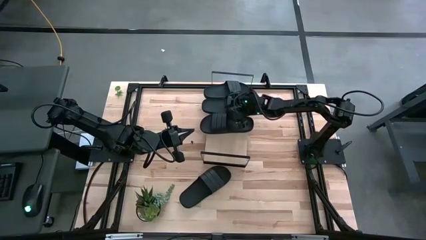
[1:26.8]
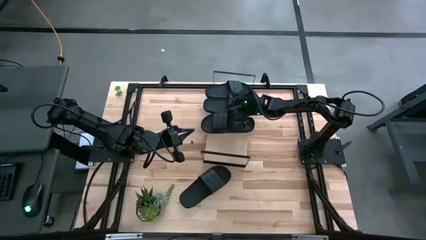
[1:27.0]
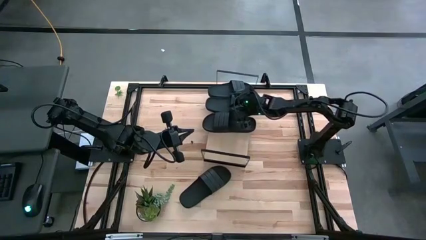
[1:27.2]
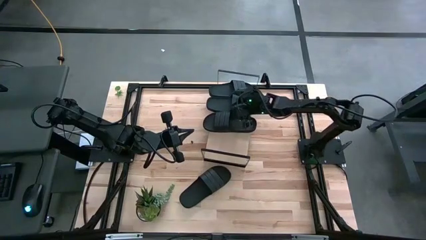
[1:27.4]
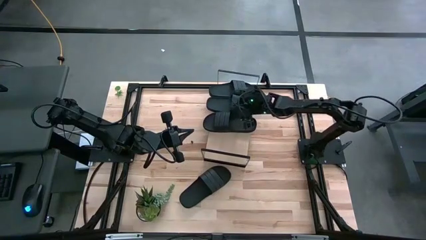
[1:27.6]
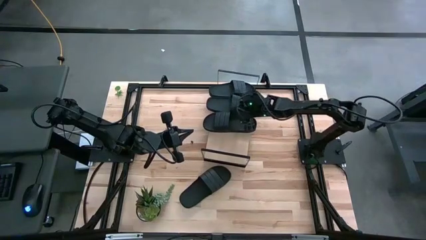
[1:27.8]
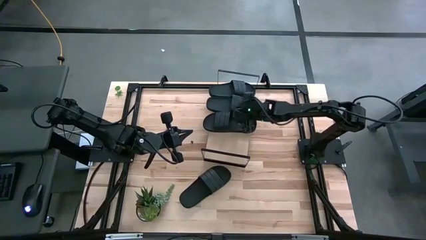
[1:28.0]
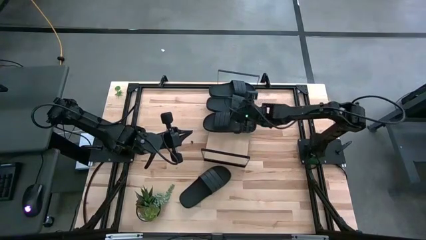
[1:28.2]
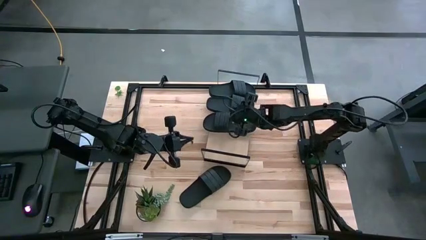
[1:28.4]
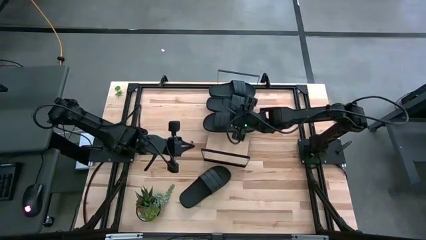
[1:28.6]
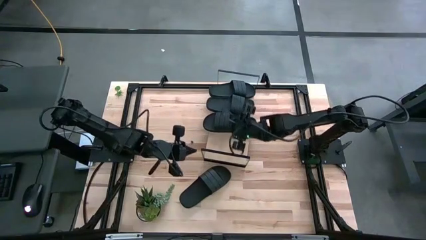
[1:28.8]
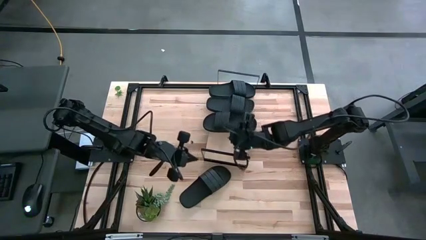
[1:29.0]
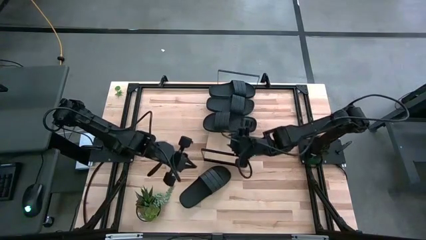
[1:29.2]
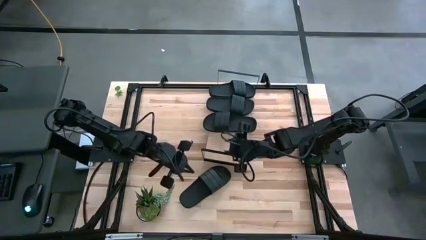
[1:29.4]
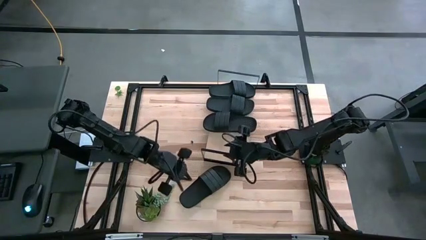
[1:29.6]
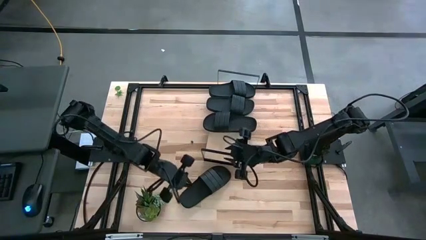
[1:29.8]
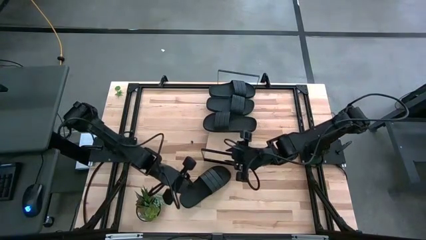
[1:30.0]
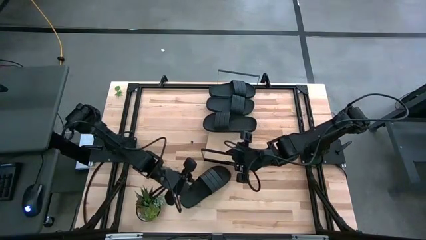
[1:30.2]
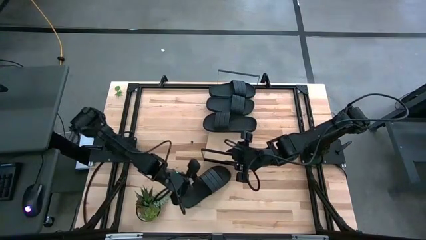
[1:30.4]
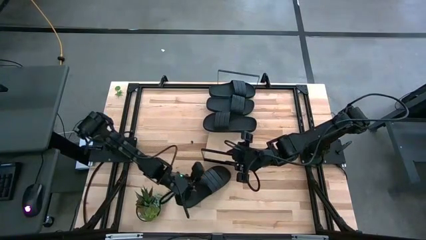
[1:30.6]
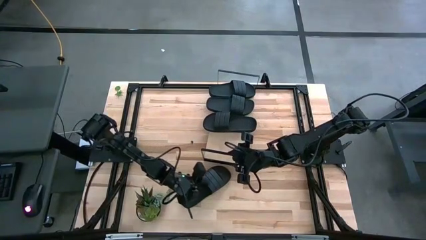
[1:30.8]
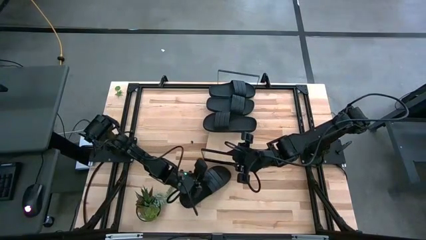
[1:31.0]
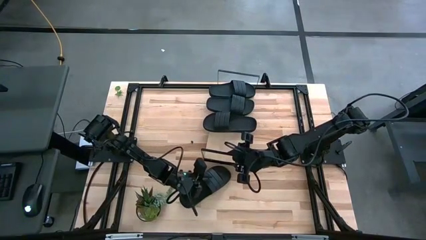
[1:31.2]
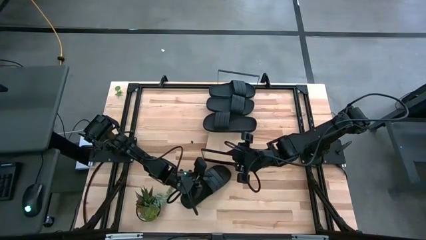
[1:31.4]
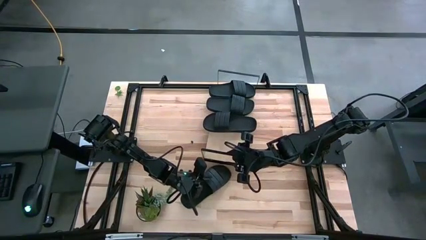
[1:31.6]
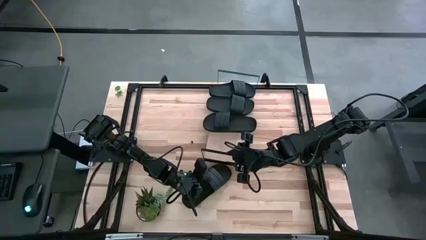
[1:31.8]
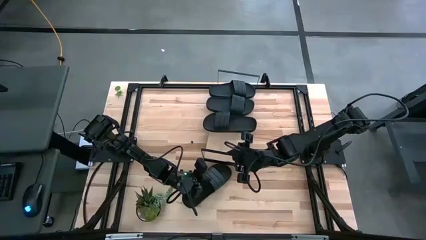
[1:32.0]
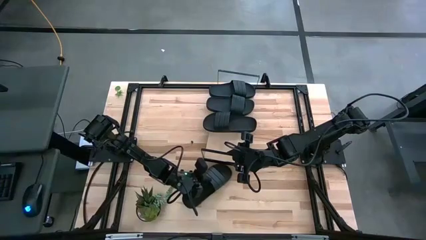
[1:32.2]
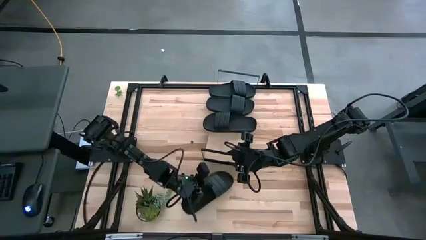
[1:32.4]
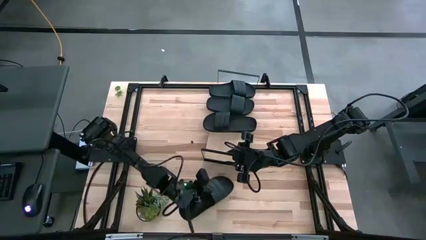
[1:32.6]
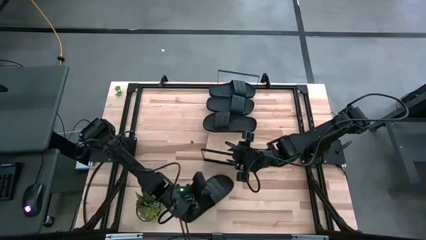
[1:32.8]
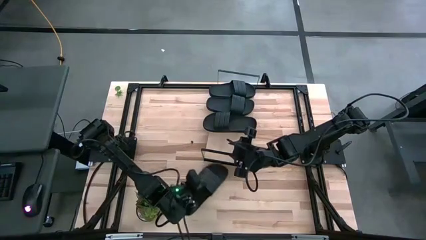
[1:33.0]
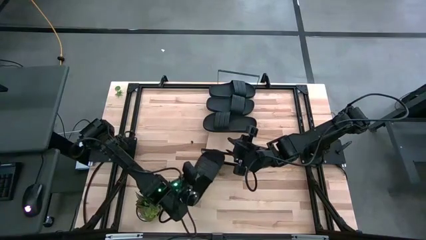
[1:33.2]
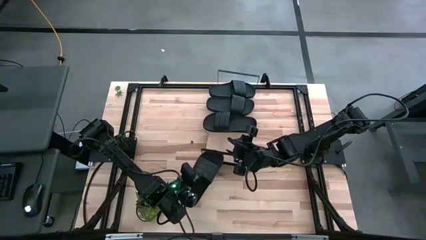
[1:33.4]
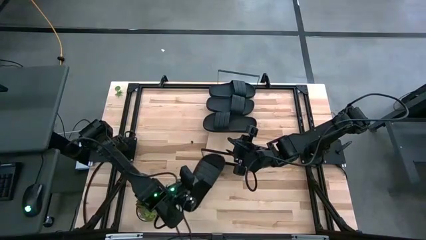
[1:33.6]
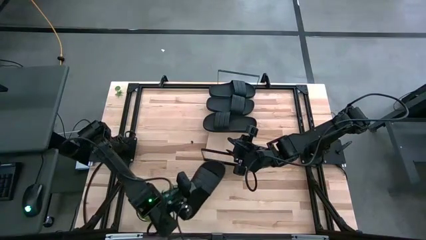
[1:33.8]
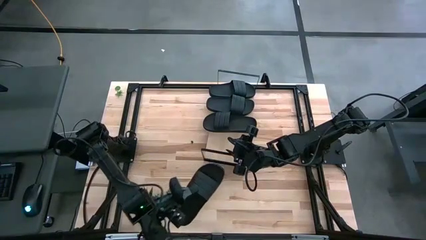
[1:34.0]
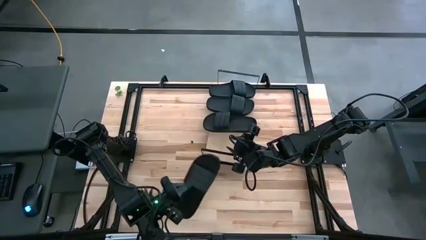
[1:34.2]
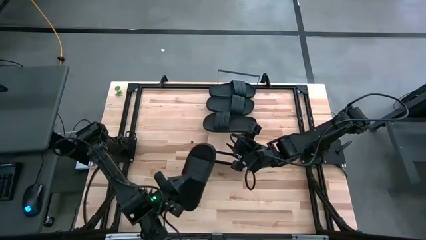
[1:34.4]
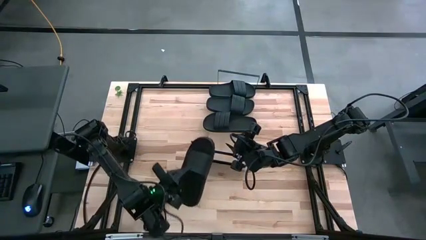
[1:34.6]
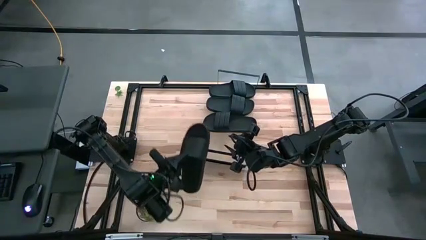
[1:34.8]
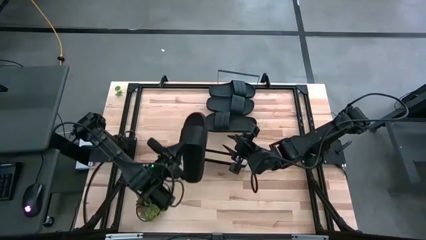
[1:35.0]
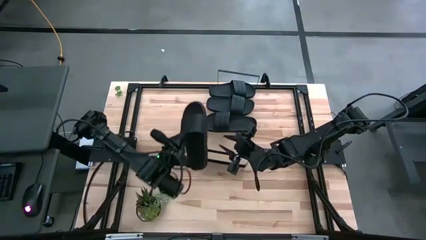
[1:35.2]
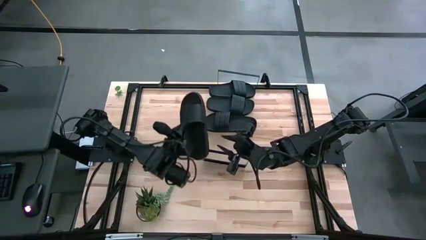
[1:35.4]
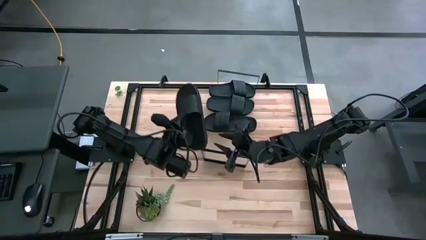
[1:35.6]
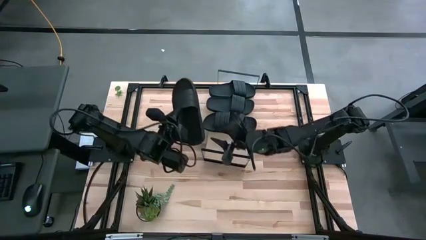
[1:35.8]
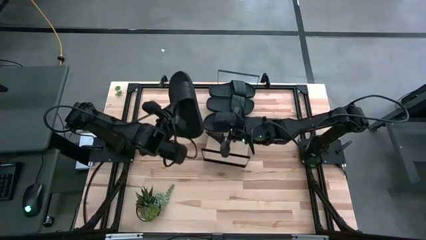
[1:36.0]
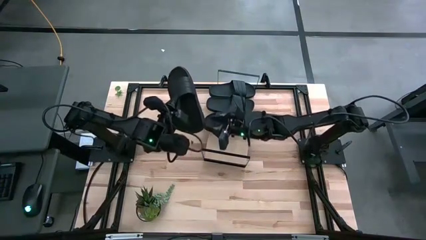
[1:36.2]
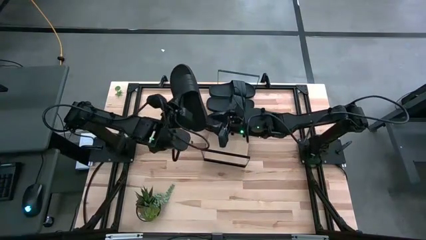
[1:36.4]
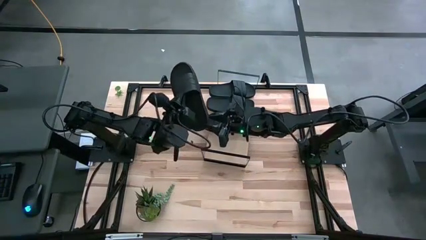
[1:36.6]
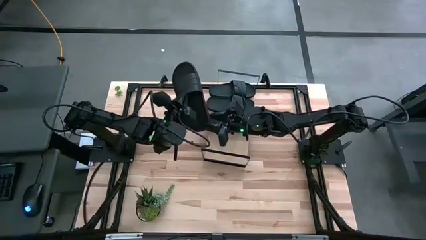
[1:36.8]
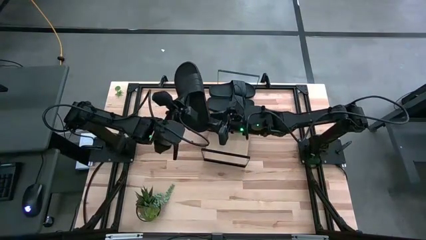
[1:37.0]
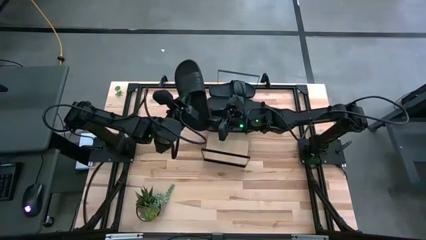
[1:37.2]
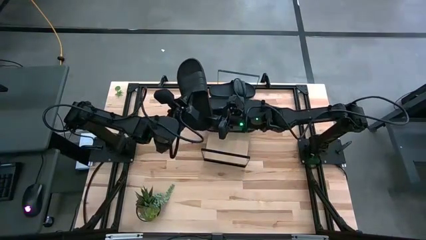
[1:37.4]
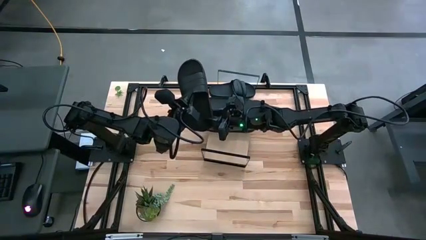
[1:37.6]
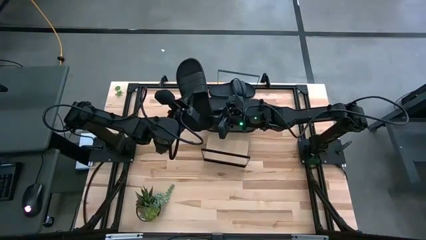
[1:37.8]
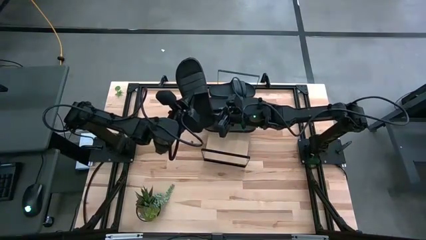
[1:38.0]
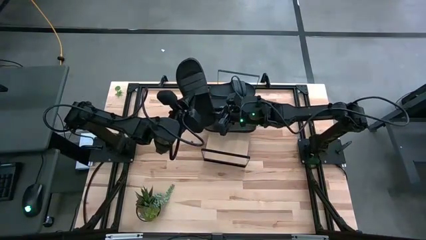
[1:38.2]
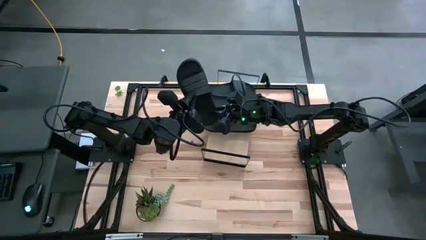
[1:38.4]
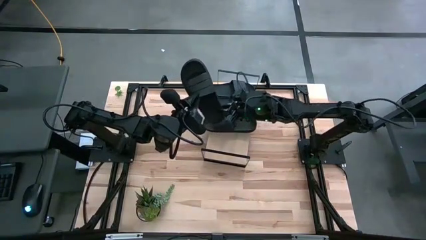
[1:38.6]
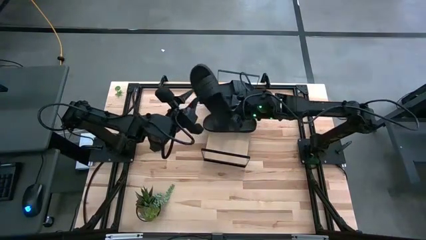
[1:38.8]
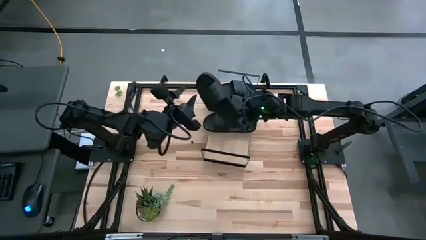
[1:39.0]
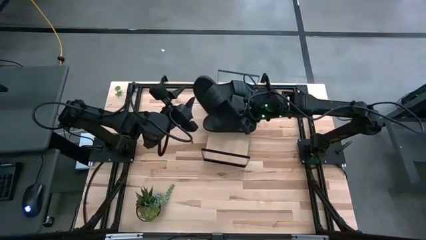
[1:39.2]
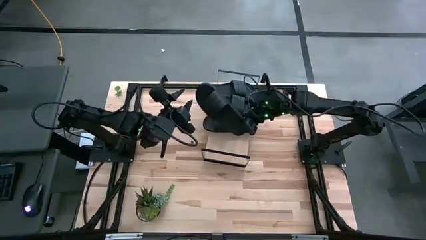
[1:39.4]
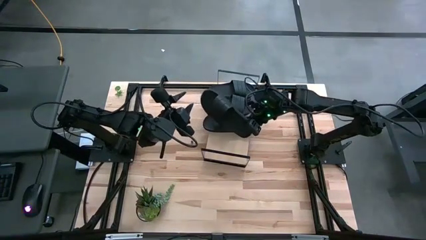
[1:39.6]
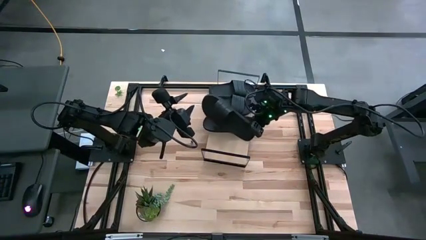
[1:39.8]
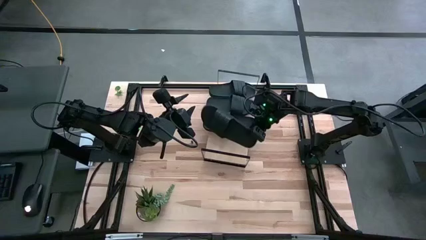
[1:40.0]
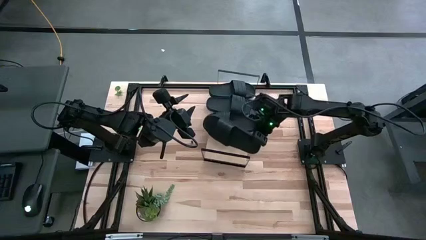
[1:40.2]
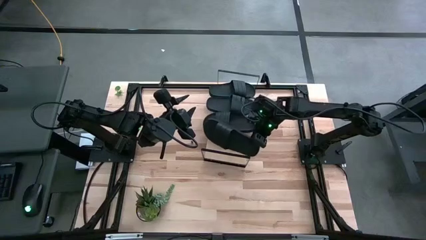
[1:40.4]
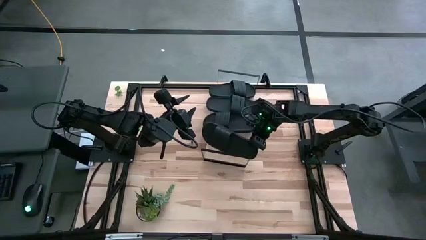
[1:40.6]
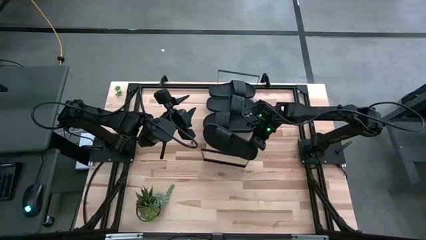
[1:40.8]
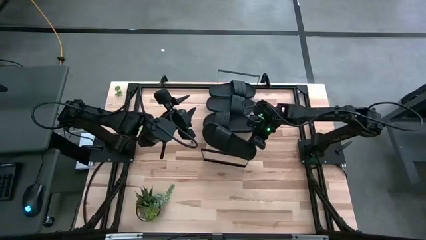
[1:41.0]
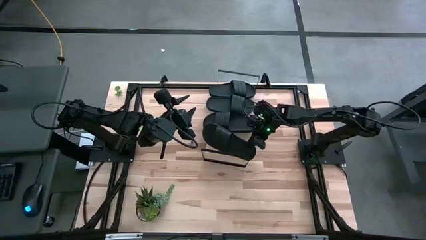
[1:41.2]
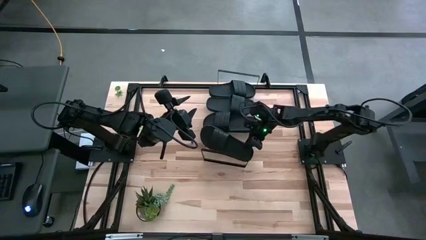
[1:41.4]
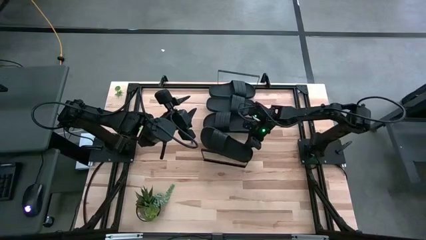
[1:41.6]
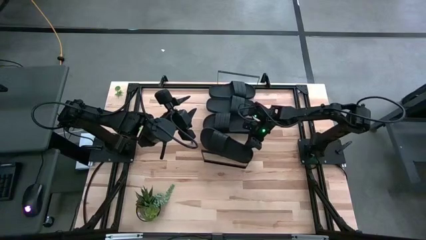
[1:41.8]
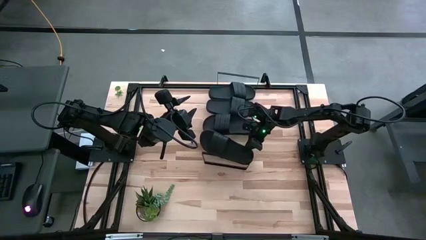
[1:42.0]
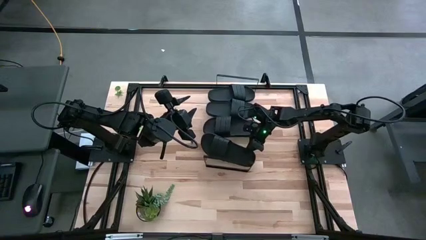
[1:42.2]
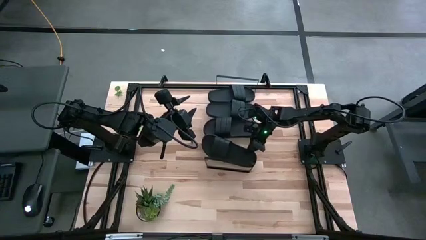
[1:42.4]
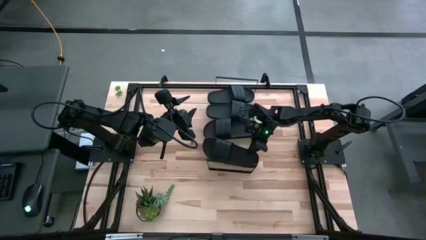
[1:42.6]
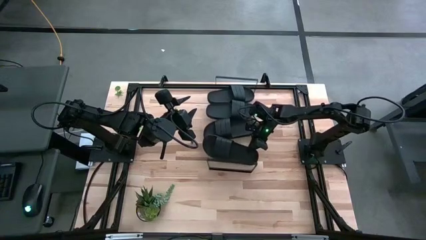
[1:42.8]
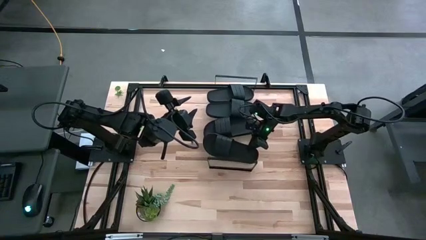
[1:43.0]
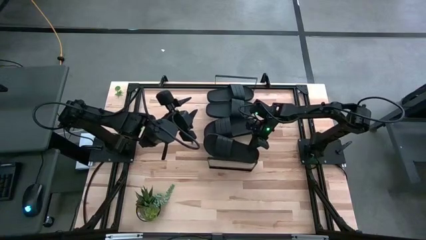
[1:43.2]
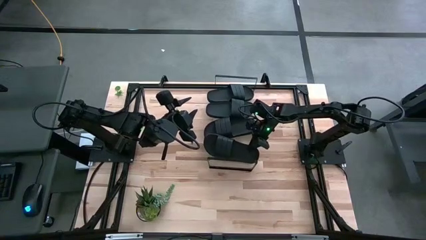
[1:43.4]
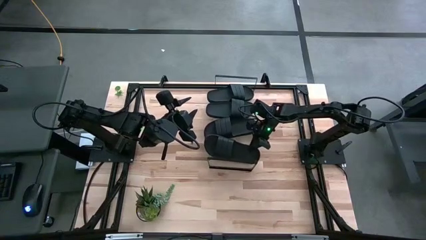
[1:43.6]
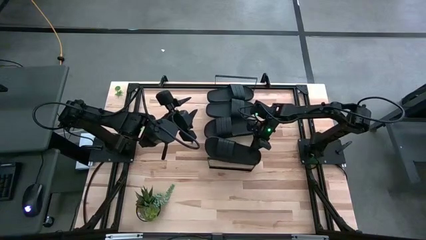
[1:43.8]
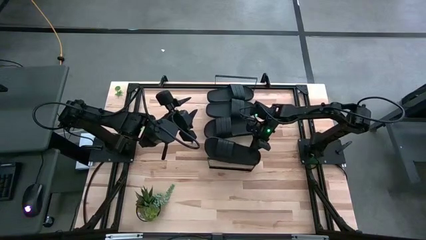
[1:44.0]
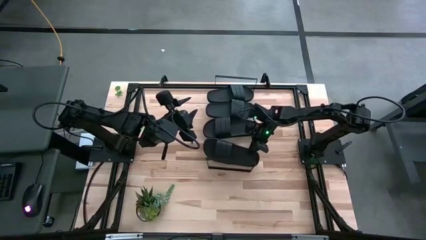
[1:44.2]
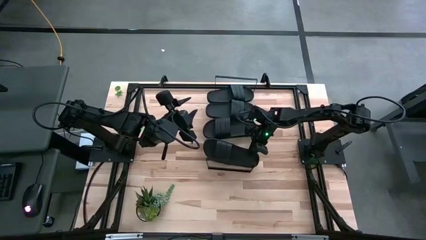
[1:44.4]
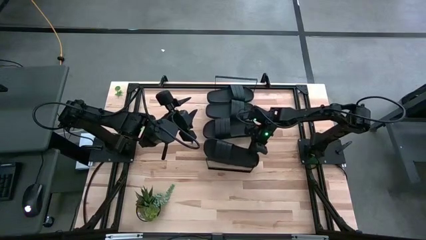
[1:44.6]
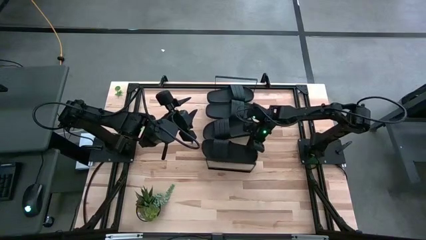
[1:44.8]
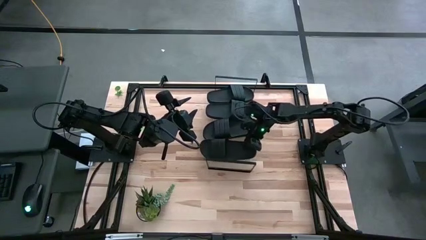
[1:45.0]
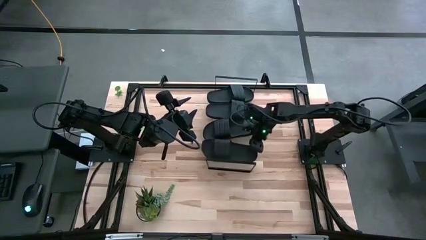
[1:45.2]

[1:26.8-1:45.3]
Task: Pick and place slides into the shelf
Put the black slide on the shelf
